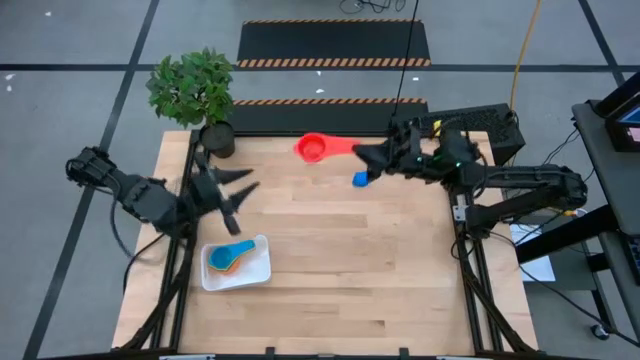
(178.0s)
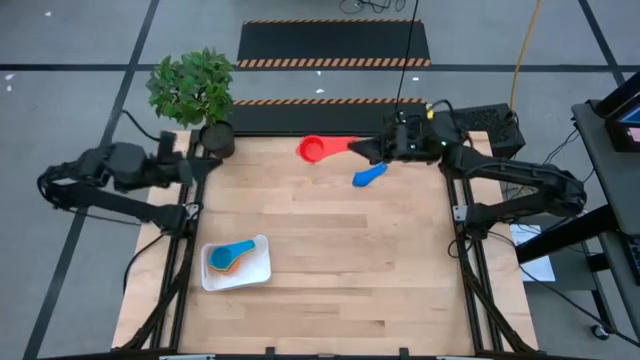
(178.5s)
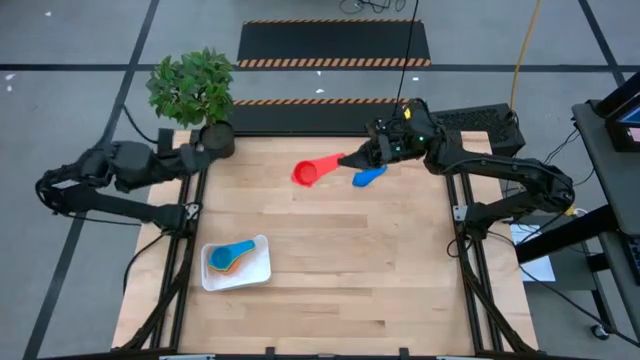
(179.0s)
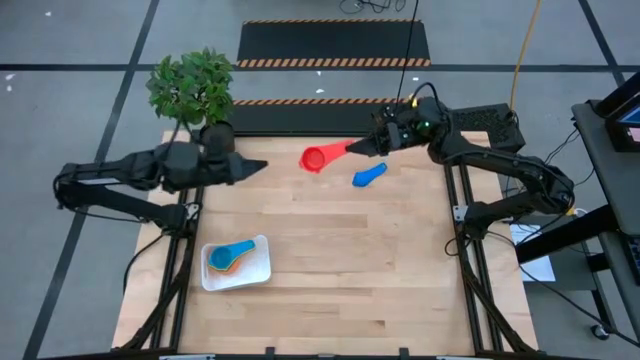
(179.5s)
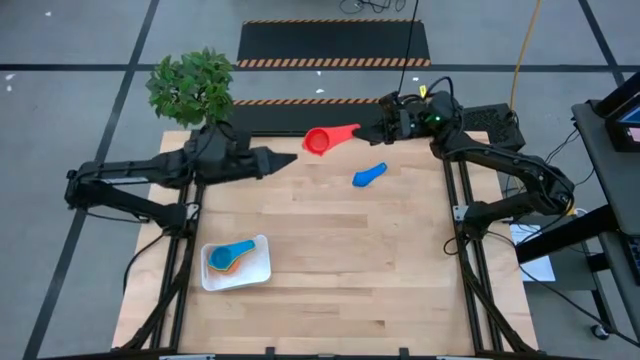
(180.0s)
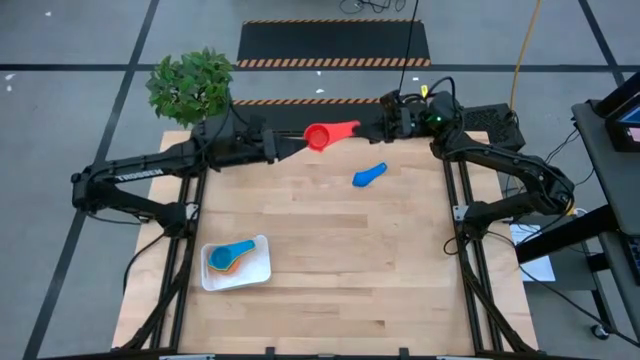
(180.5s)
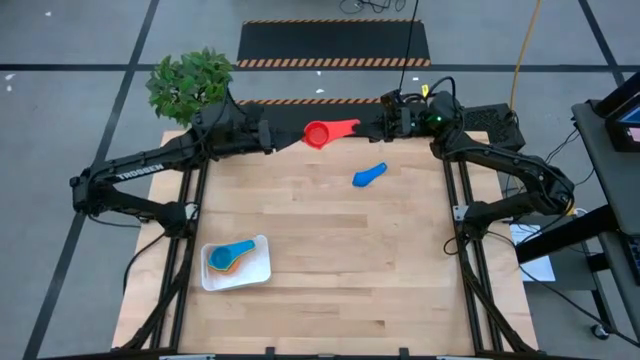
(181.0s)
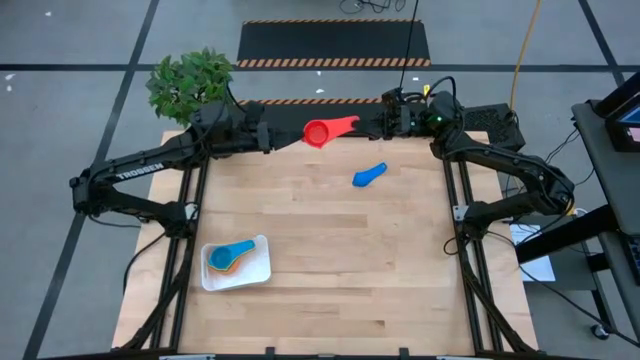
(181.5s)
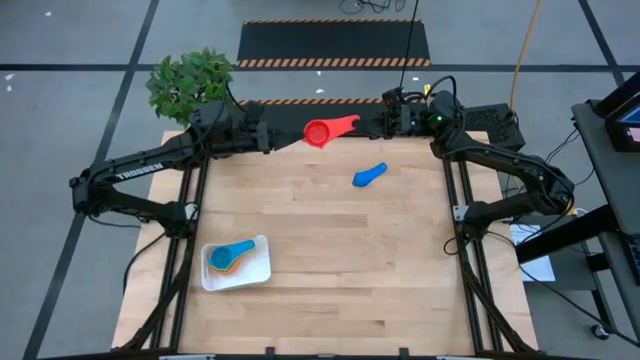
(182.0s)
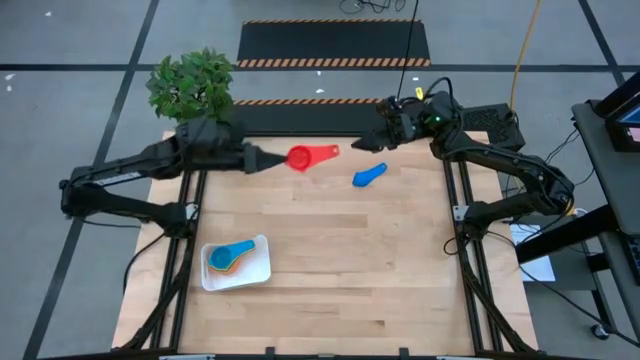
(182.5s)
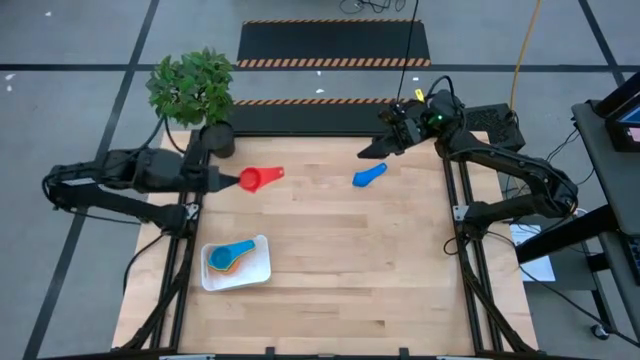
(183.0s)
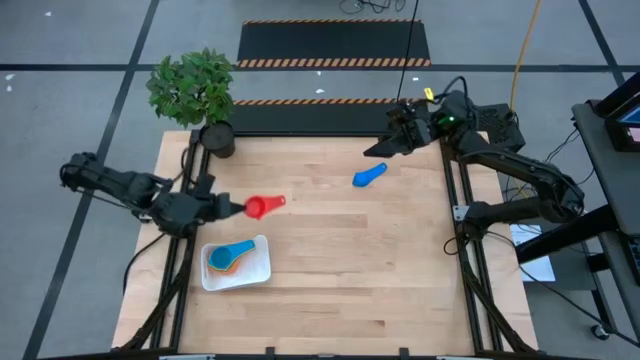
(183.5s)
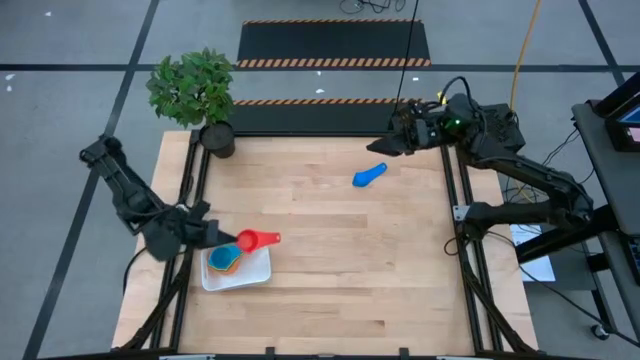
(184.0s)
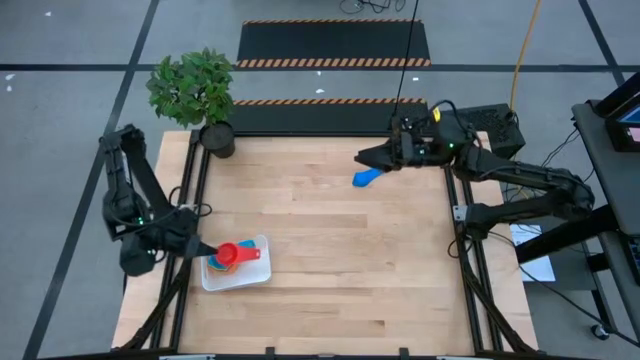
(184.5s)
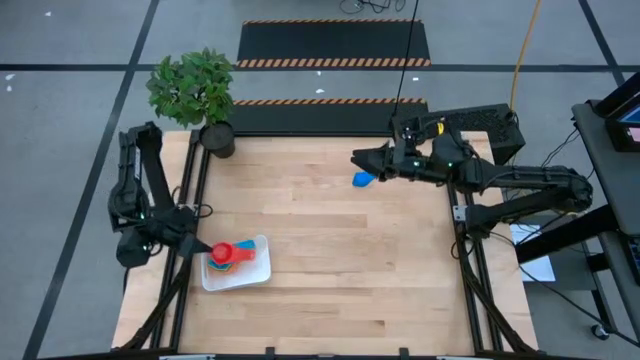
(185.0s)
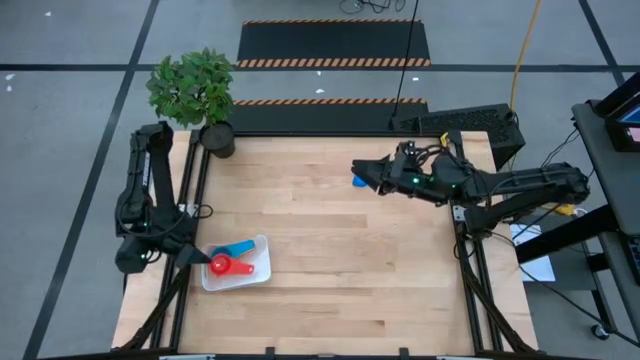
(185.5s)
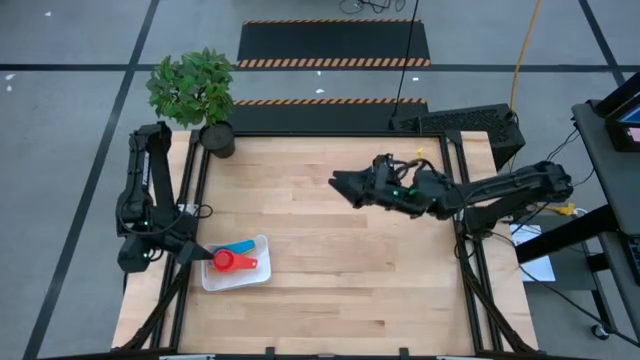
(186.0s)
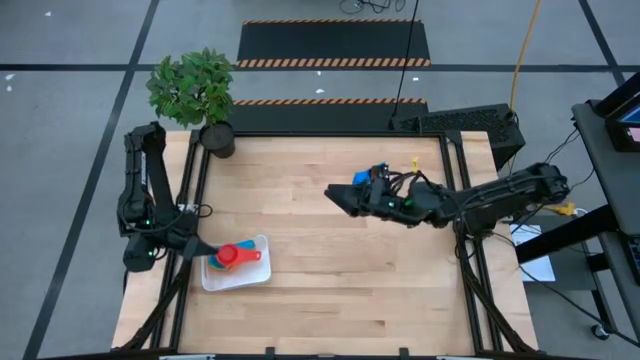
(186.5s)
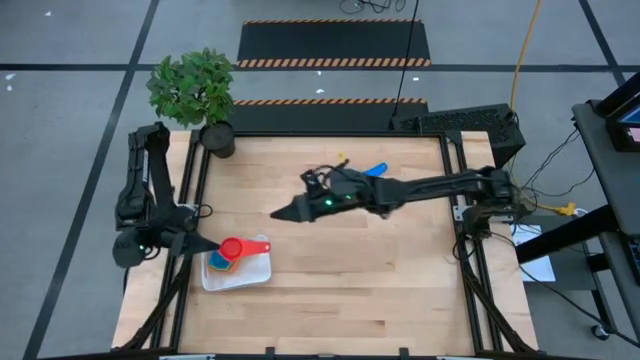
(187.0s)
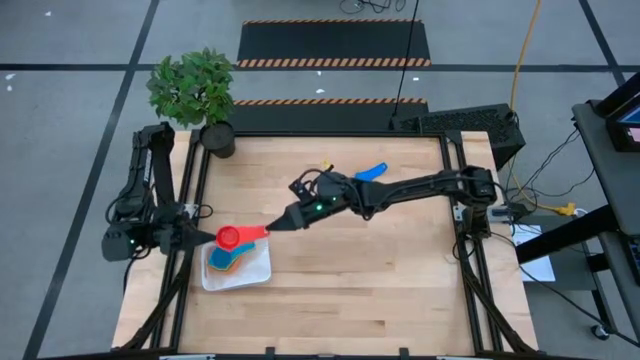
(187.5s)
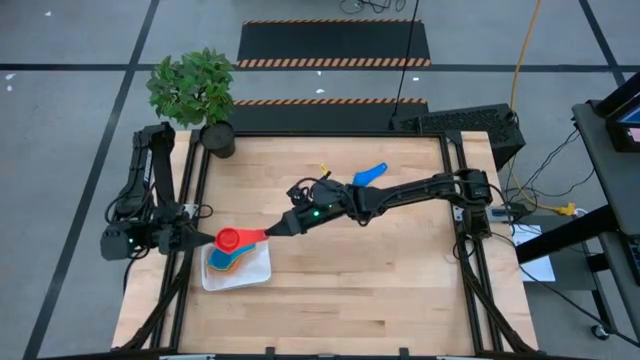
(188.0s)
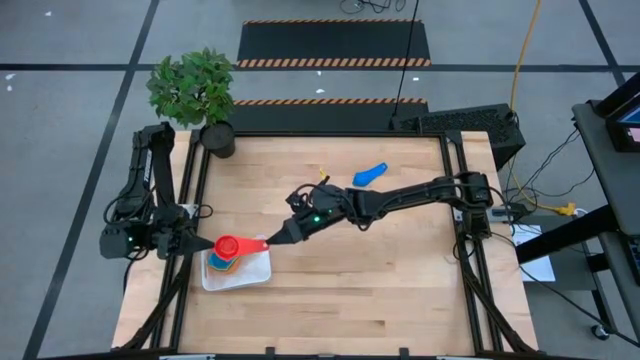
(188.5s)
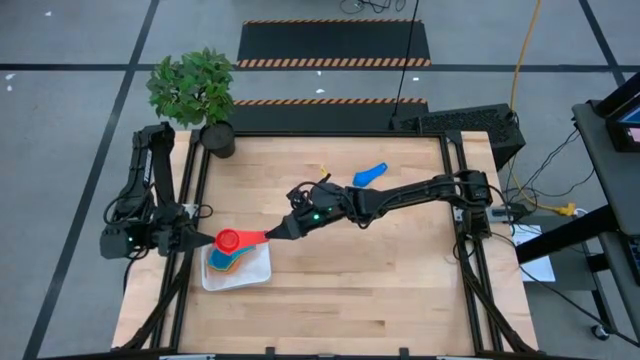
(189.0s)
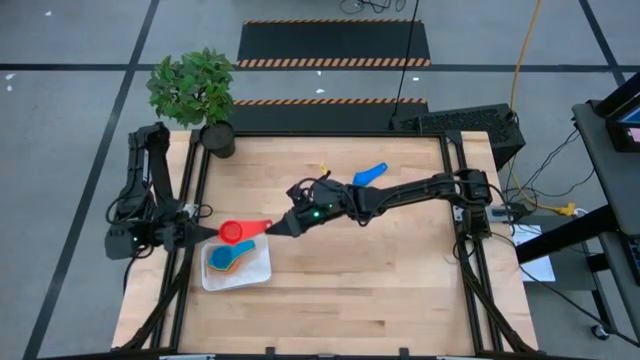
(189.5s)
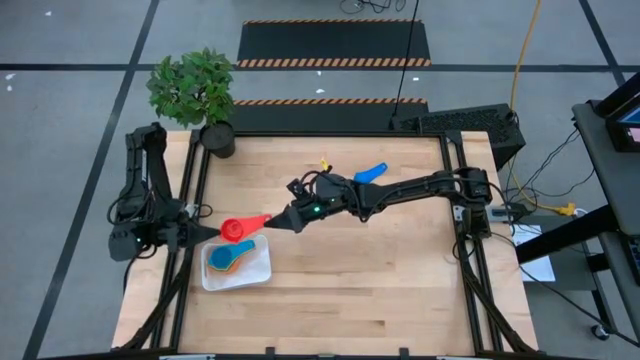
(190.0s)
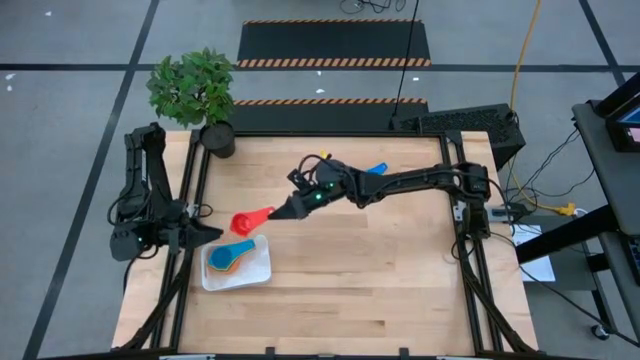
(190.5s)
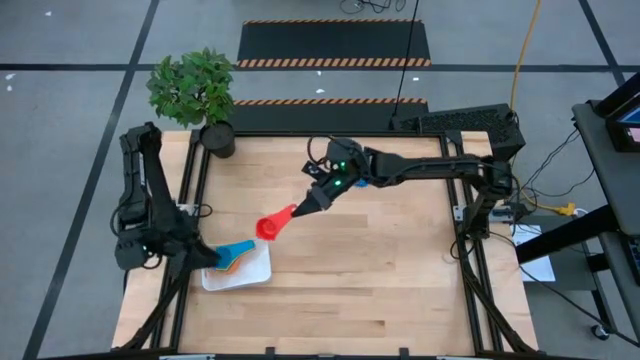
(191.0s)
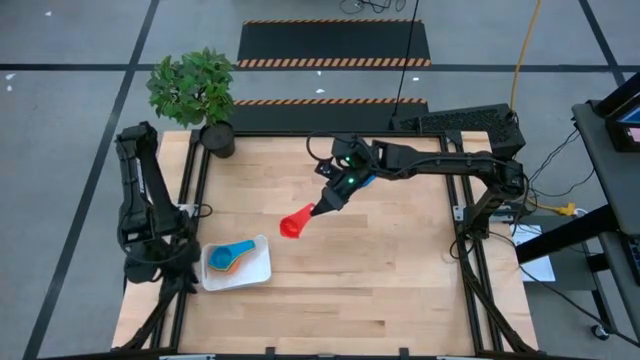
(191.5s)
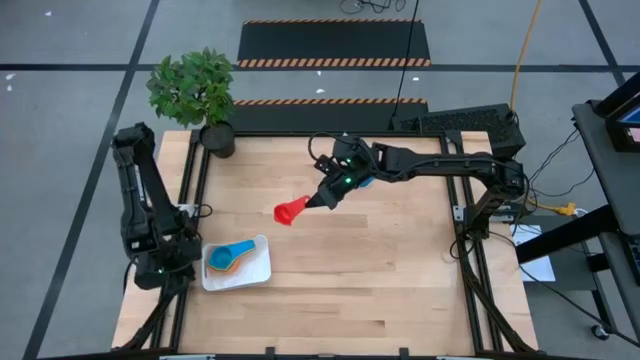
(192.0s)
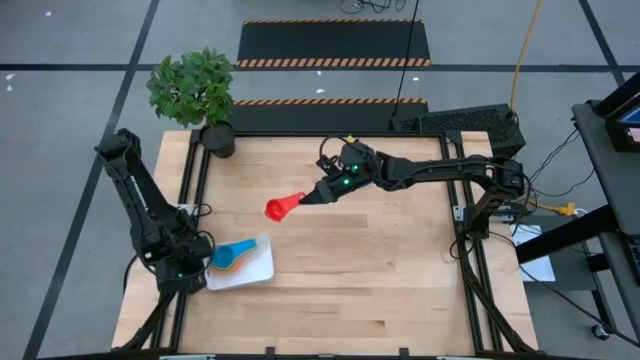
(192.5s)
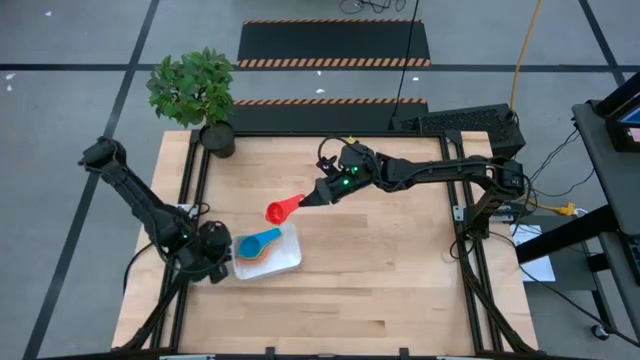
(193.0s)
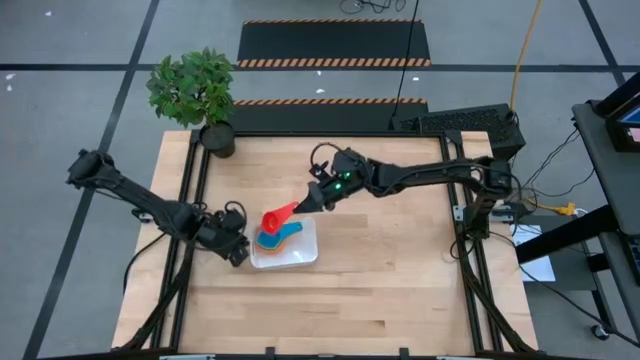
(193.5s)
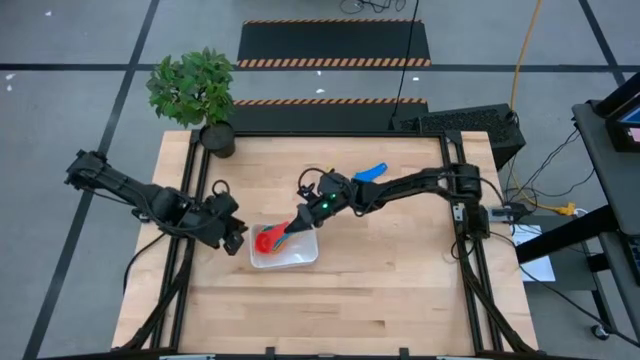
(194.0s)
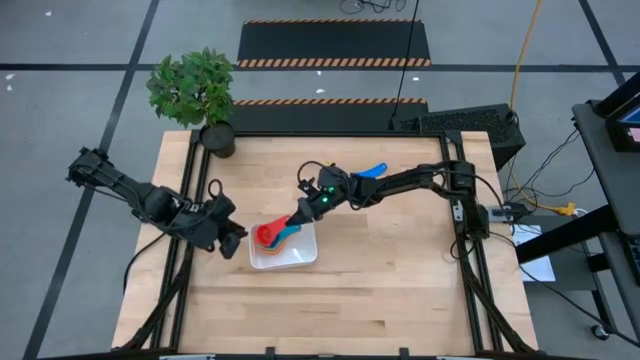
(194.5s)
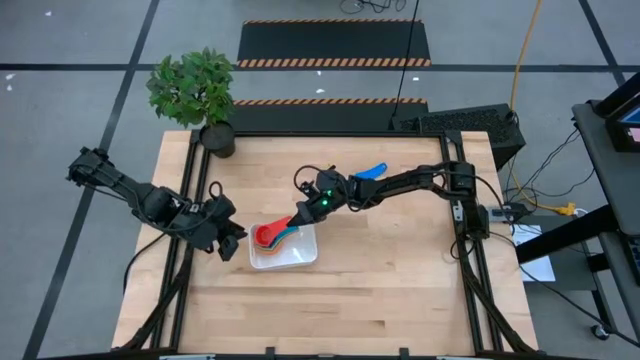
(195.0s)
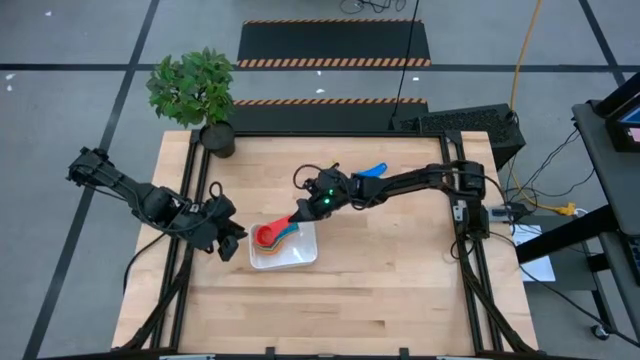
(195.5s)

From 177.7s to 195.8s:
Task: Nest measuring cups in basket
Stack the red measuring cup on top of the light blue measuring cup in the white bin

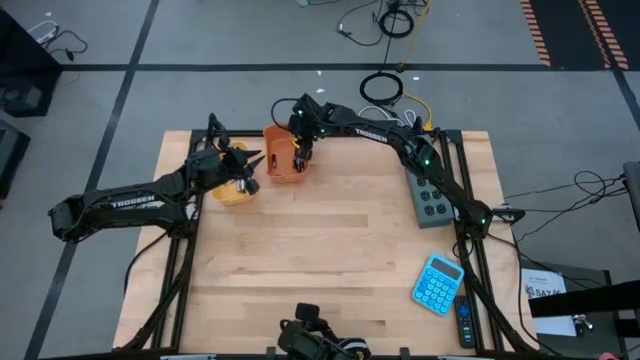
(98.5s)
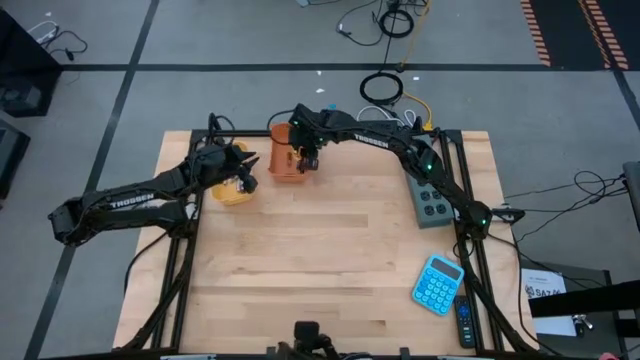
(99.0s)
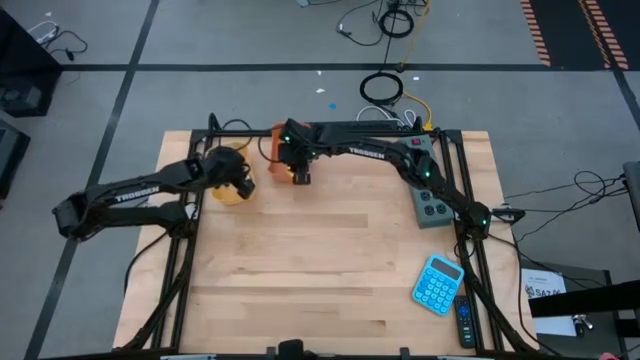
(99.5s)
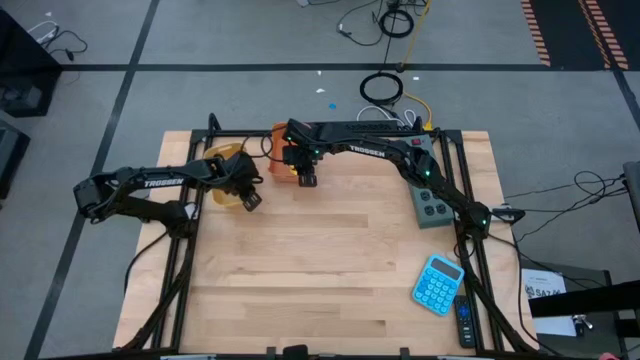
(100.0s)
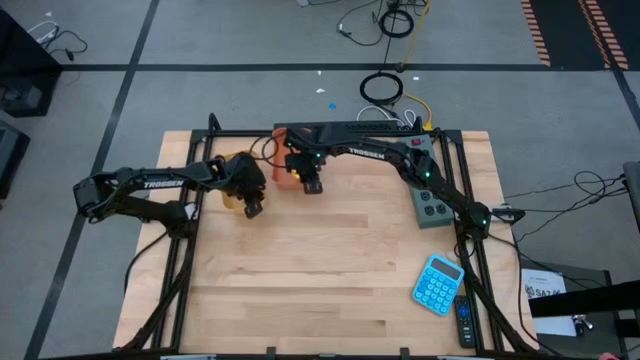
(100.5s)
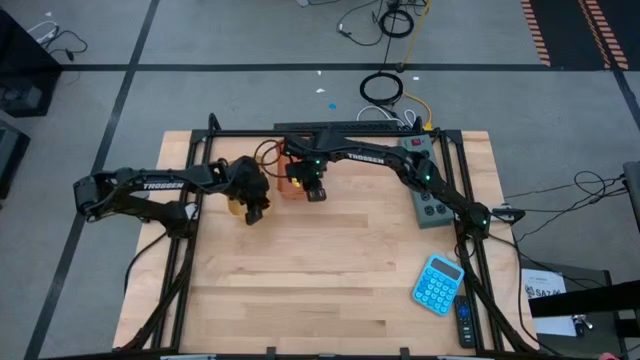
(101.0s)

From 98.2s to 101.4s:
Task: Sort batteries
Adjust the bins on the table
